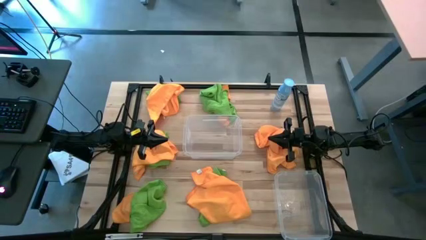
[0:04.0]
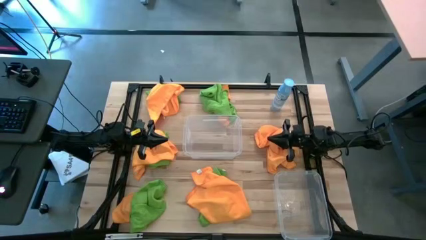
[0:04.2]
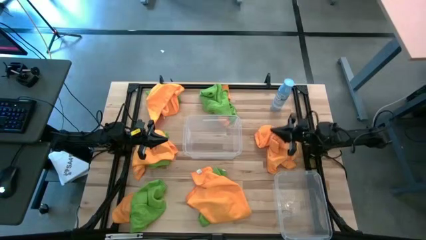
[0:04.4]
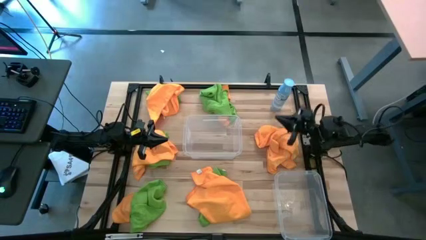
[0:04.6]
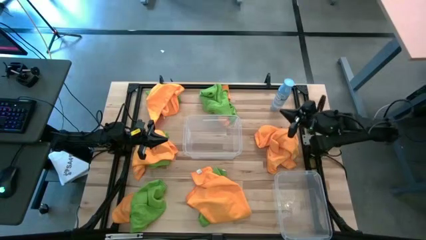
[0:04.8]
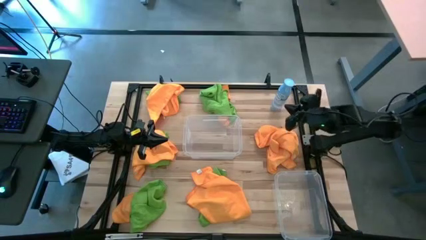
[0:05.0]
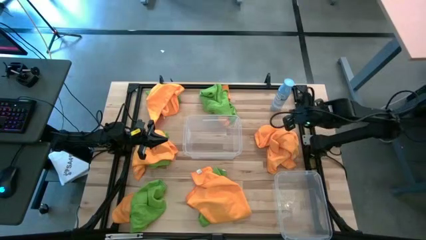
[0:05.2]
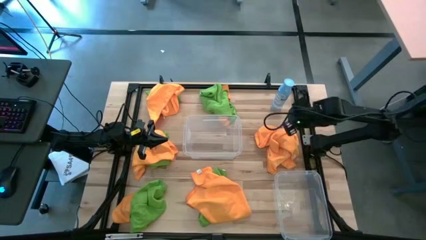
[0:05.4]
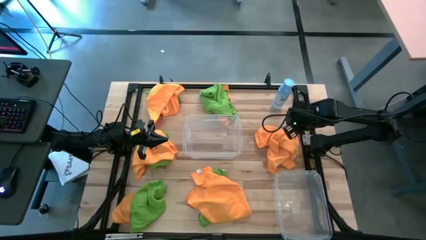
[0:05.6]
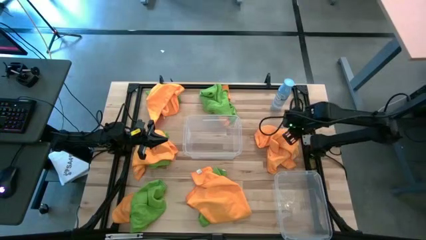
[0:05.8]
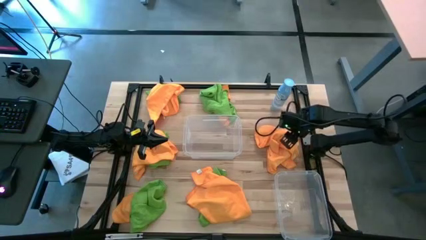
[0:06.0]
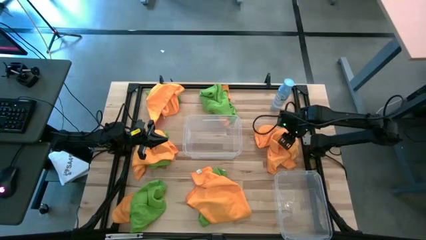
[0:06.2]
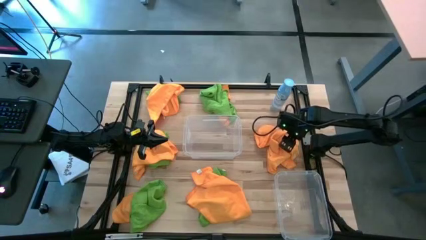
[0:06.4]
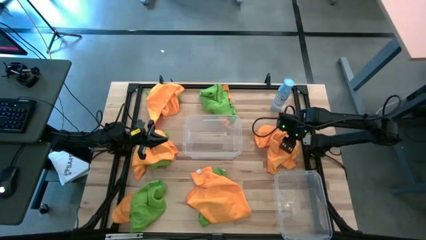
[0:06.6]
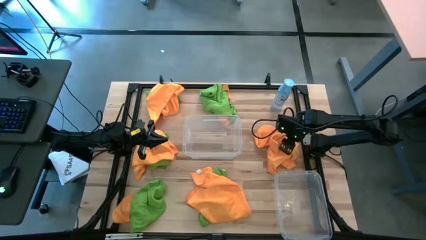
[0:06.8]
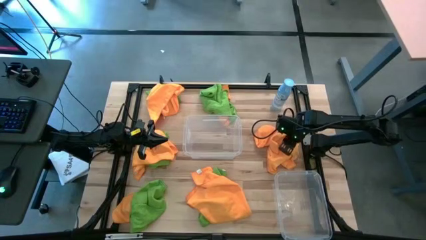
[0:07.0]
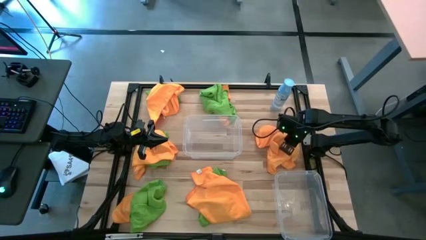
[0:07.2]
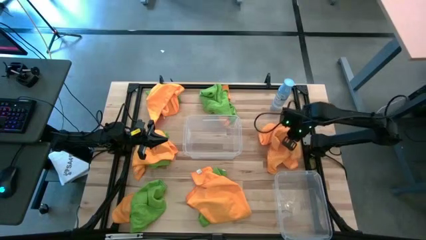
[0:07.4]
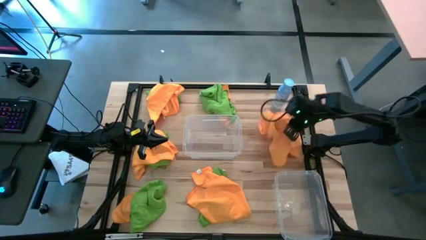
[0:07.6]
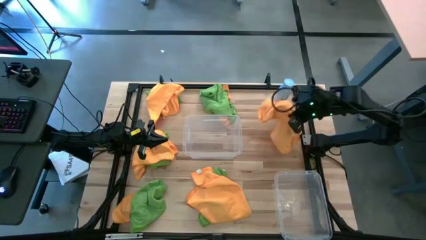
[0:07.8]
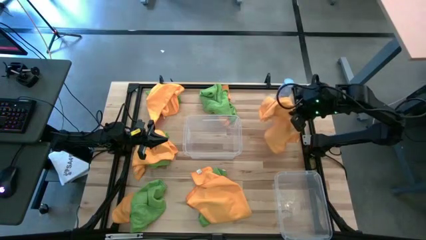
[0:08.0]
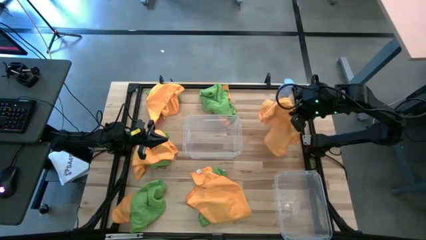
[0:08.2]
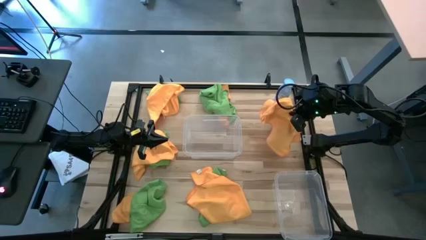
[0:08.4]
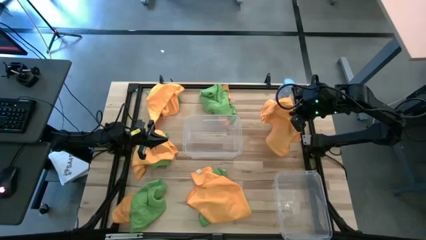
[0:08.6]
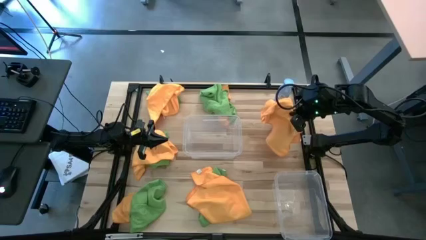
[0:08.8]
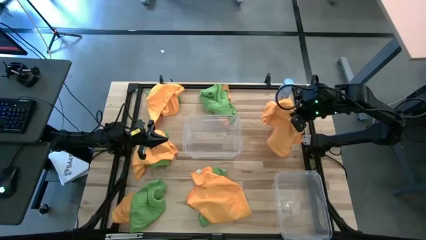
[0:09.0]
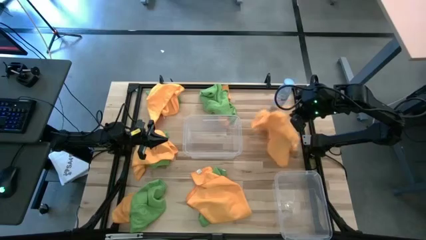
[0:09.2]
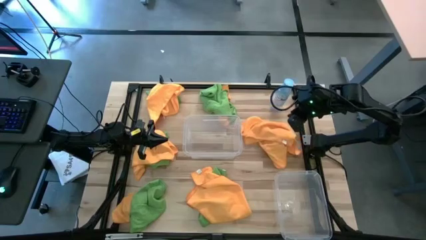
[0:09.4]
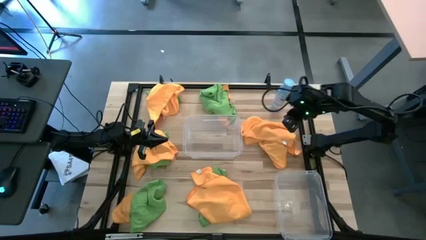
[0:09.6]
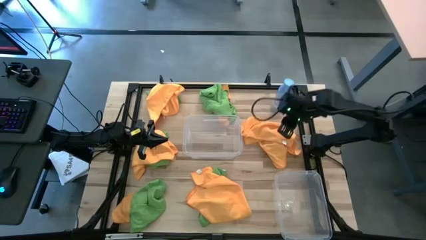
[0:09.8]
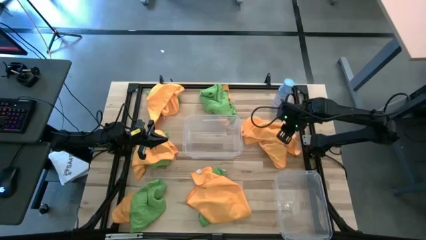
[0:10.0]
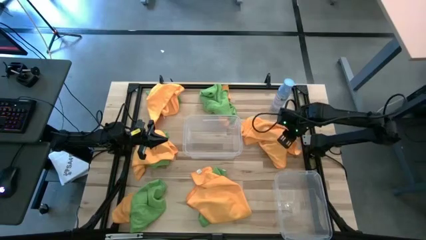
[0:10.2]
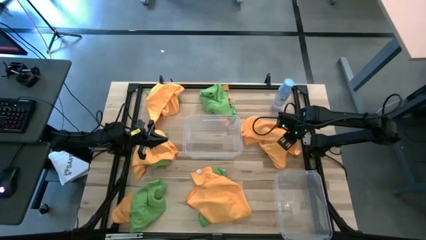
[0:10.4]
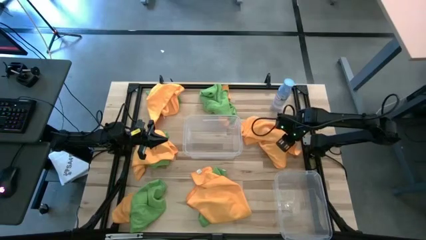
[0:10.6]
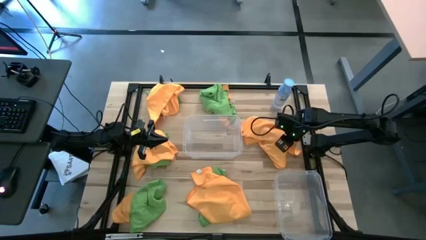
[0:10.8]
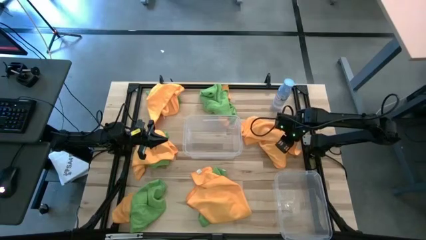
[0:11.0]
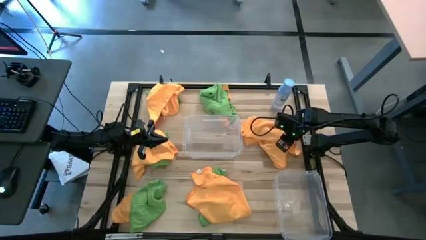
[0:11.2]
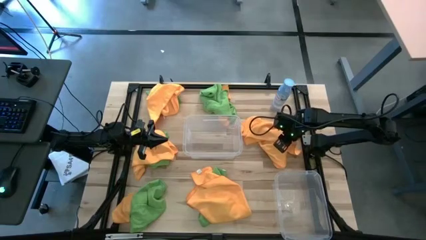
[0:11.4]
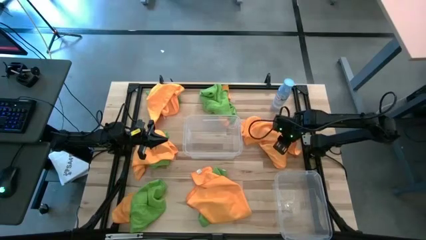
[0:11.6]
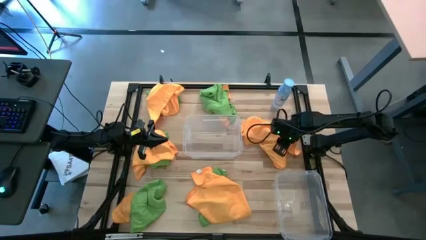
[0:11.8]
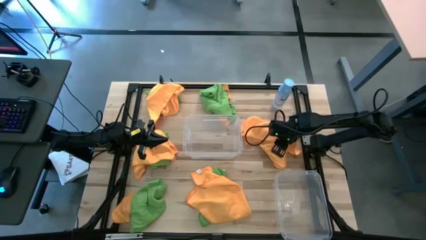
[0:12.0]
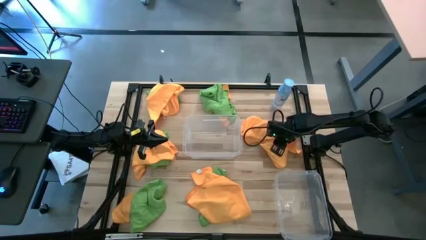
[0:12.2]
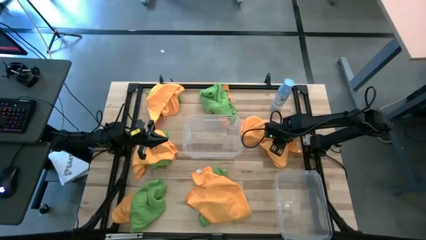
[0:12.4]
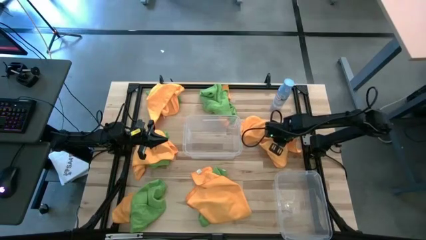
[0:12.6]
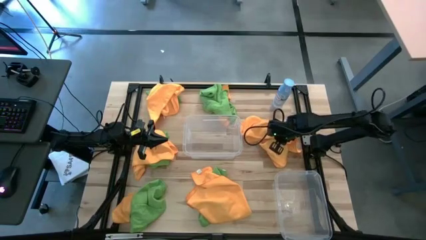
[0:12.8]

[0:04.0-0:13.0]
Task: Sort microfiber towel by color & place in baskets
Put the yellow microfiber cloth into the top transparent bin

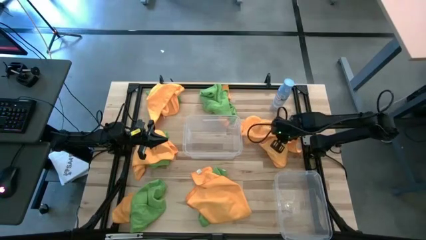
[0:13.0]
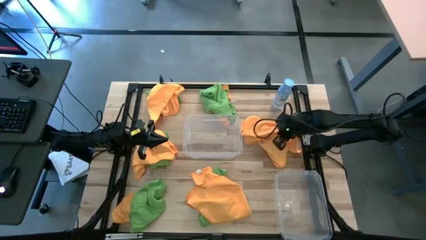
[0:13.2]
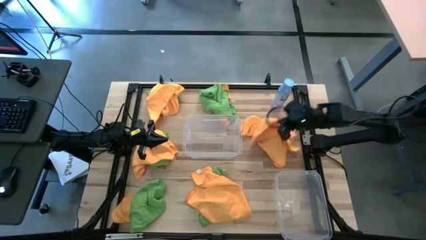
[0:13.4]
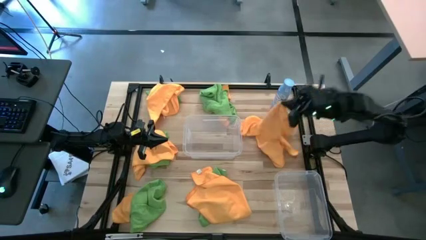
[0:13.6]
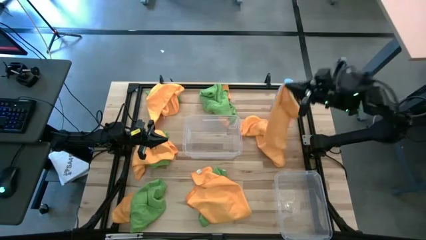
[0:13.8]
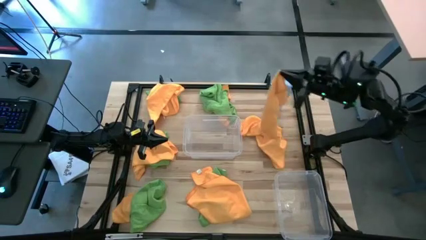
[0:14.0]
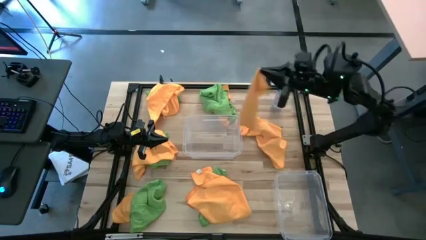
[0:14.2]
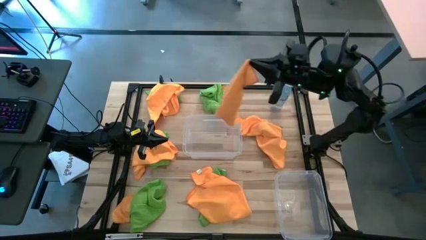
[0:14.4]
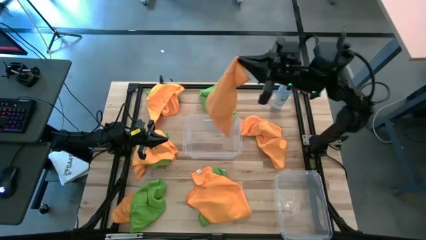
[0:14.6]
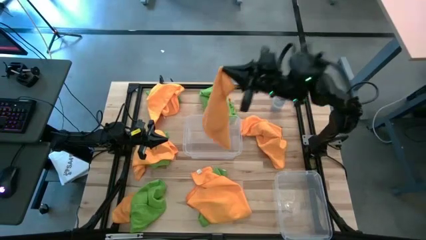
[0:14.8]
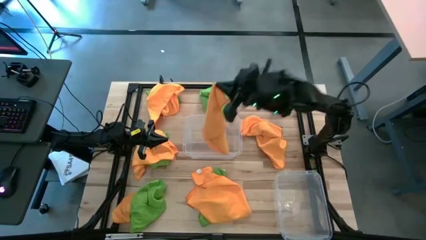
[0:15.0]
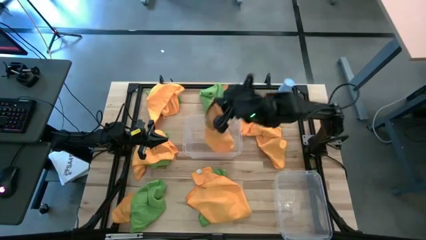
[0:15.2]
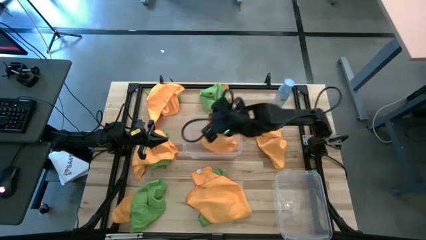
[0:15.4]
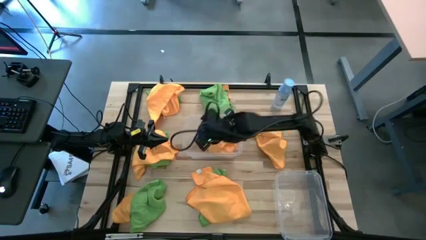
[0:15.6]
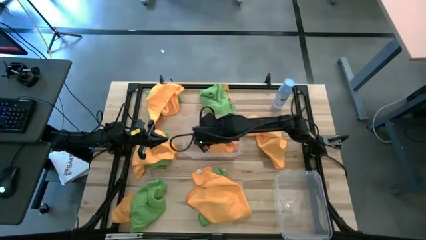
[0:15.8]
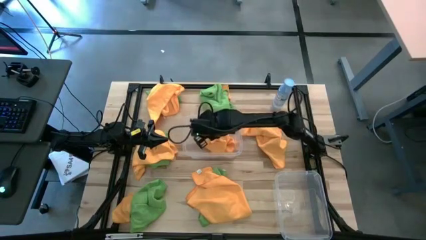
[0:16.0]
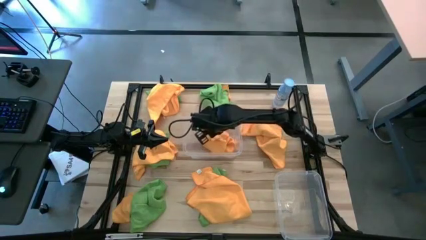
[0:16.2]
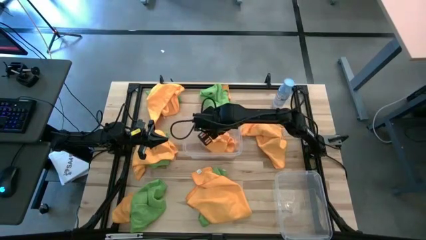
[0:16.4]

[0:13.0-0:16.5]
Put the yellow microfiber cloth into the top transparent bin

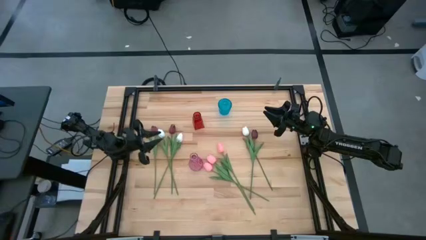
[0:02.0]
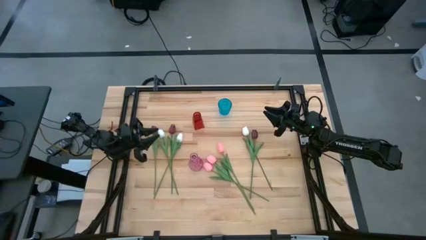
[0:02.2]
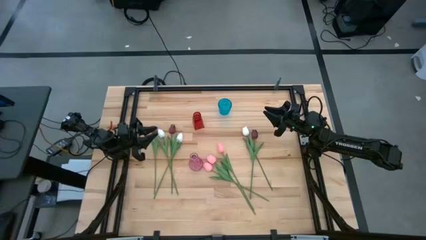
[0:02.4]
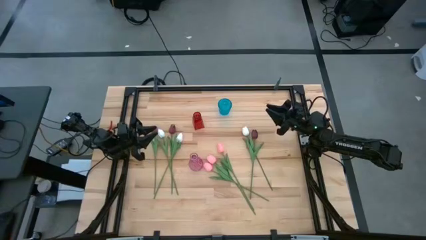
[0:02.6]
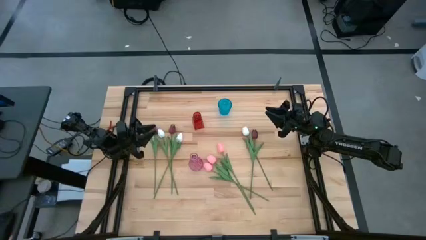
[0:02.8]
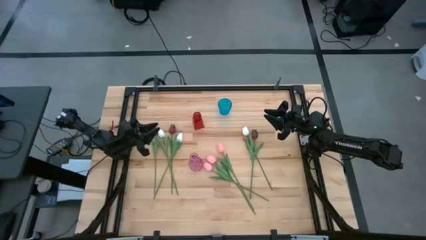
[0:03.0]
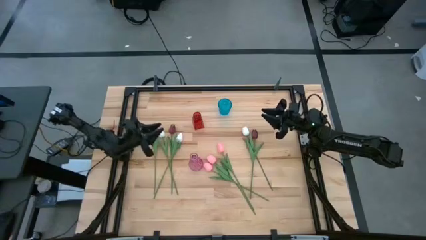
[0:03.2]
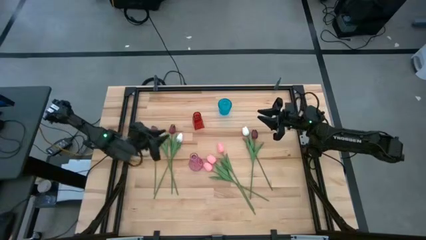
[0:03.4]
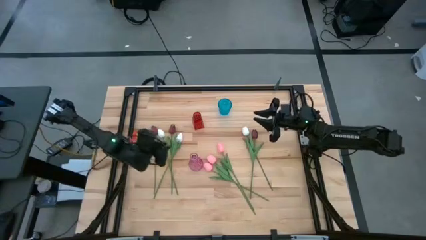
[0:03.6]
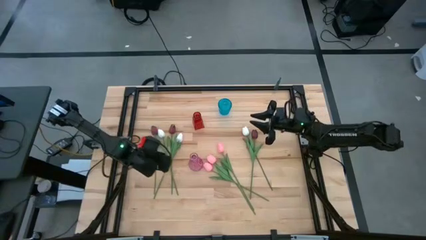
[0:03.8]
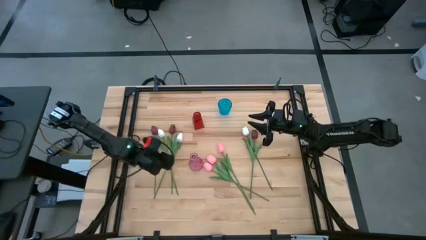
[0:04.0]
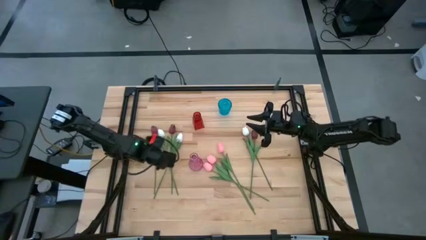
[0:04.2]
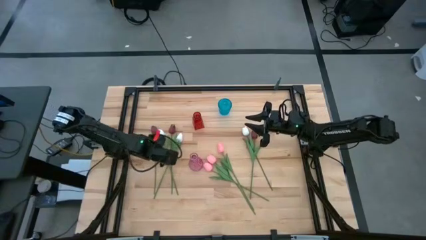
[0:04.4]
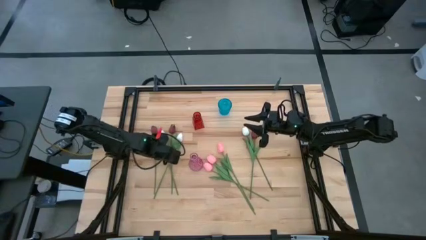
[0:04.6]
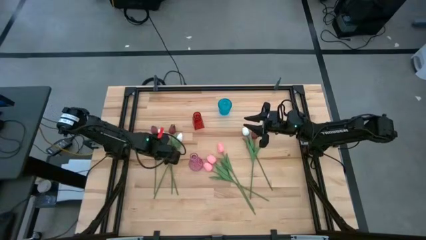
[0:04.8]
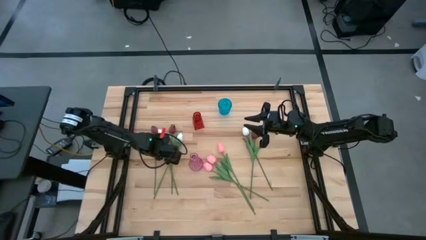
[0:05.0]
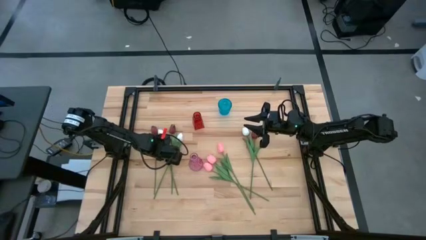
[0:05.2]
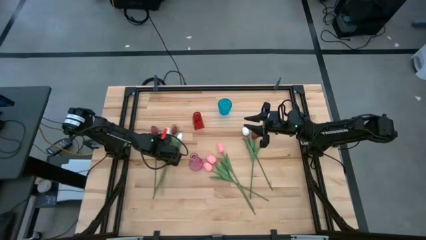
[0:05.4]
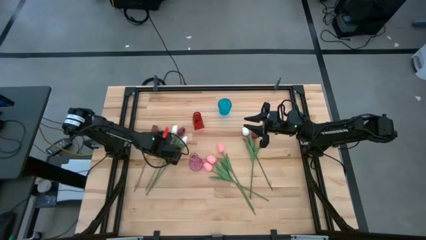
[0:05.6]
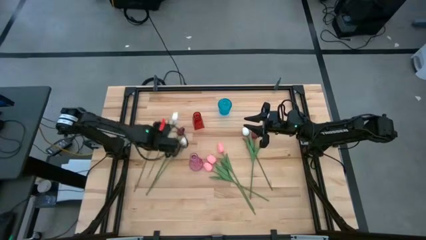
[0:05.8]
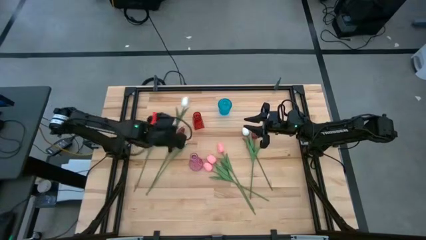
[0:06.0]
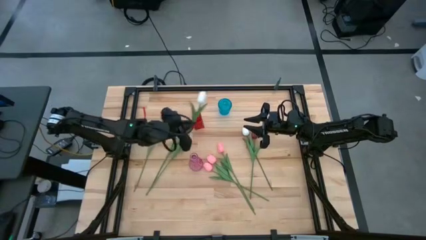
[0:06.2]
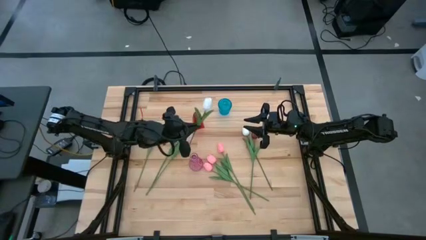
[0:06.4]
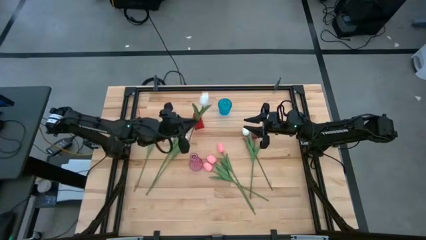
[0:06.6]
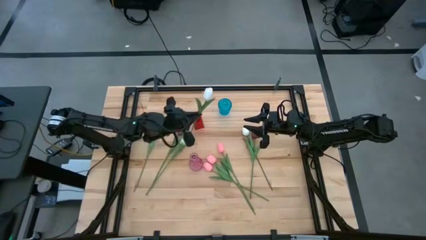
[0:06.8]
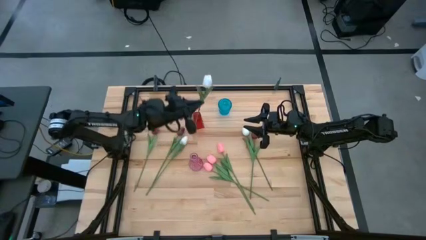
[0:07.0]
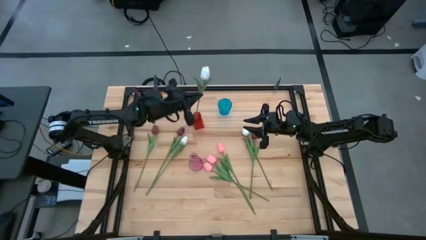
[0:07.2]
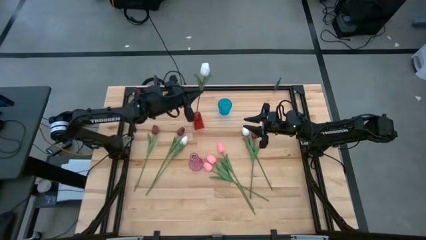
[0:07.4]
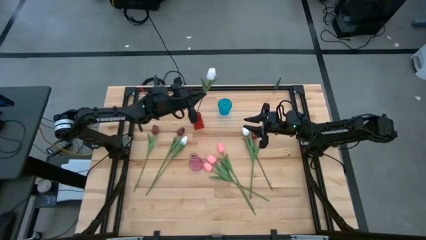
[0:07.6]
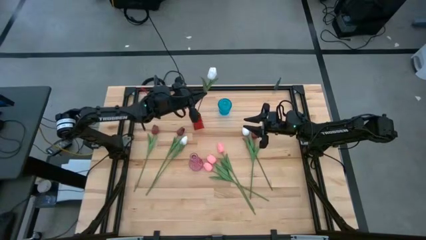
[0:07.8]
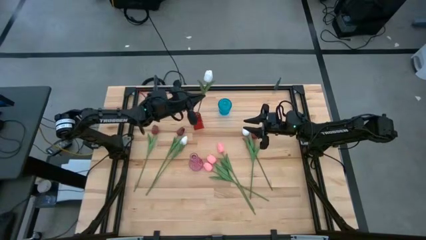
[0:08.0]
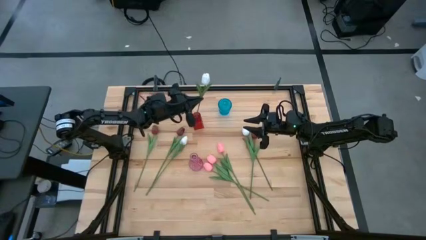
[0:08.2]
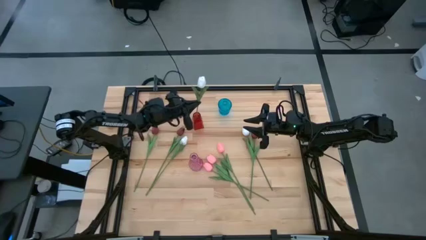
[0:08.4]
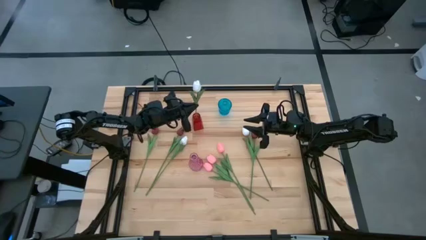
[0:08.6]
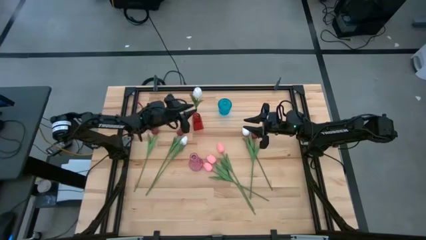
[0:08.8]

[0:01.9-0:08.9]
Task: Sort flowers into vase by color
Put the left white tulip into the red flower vase
